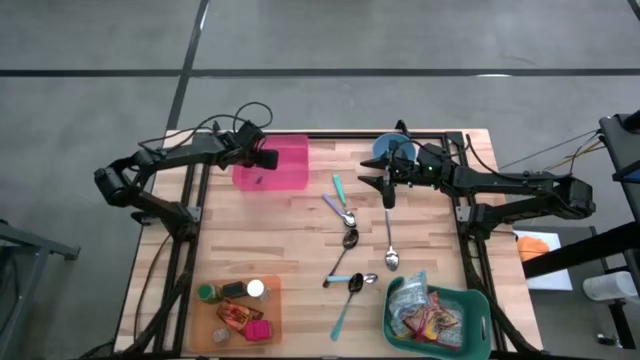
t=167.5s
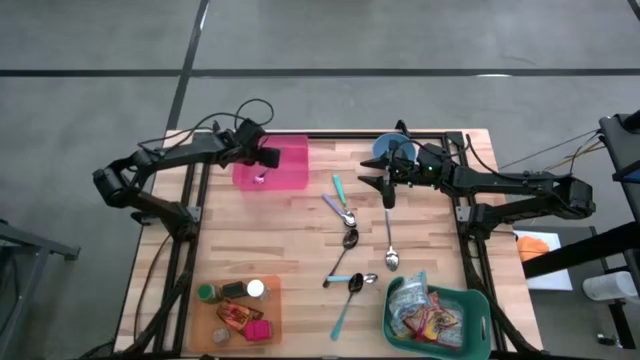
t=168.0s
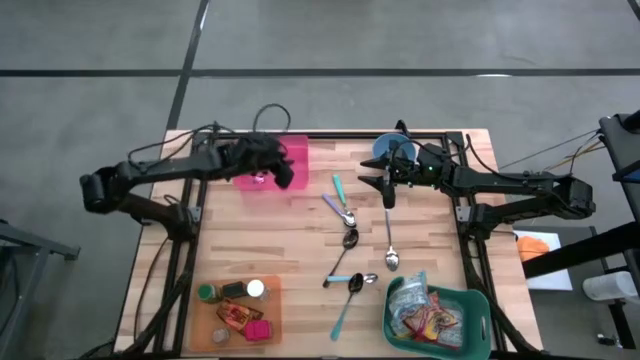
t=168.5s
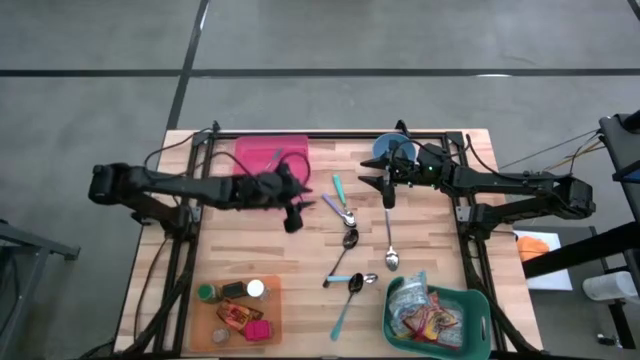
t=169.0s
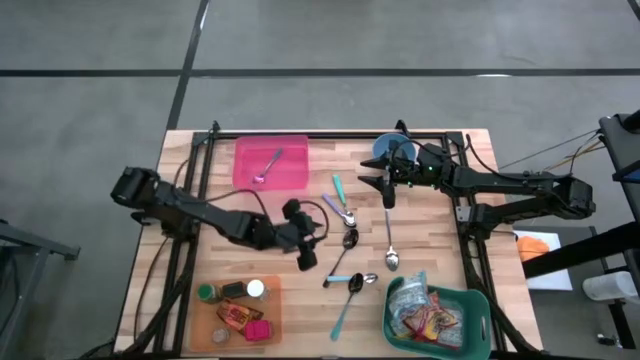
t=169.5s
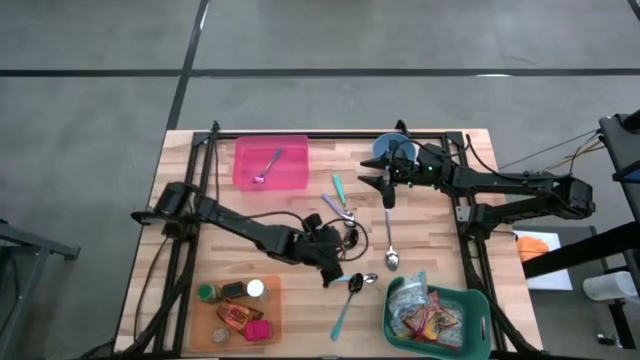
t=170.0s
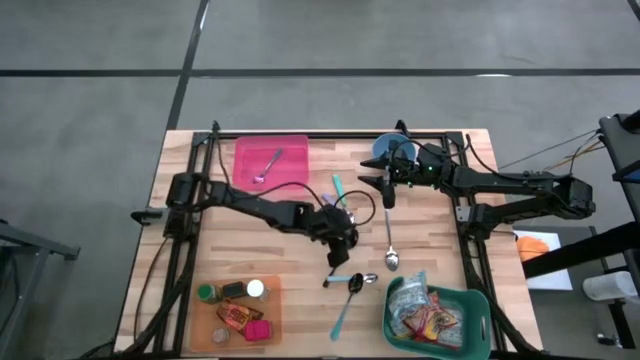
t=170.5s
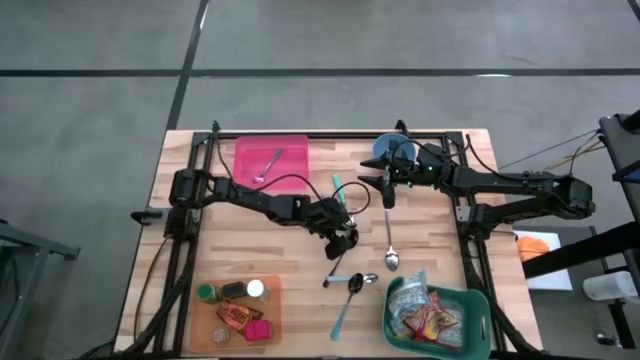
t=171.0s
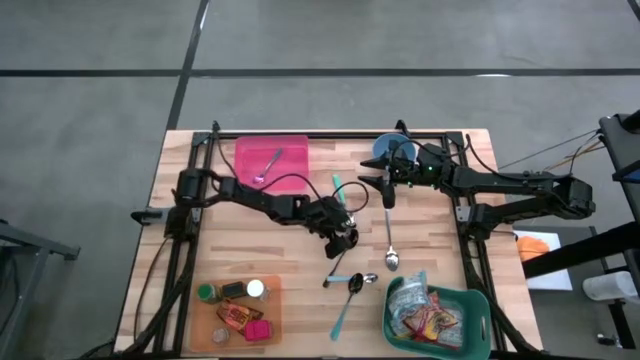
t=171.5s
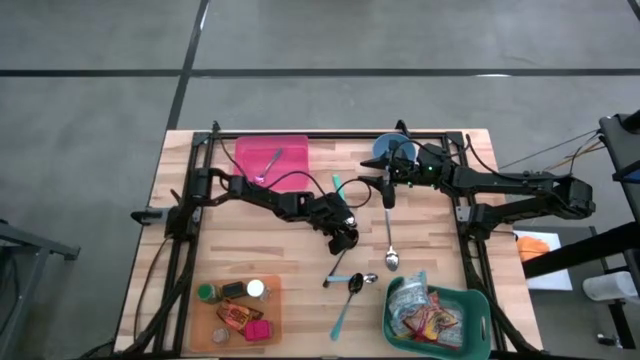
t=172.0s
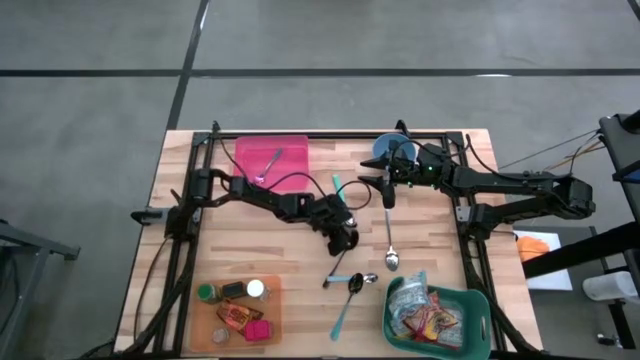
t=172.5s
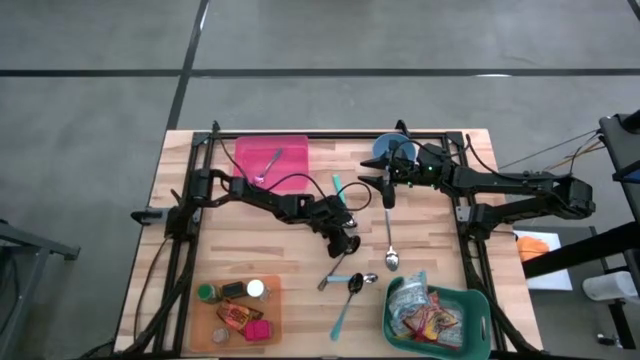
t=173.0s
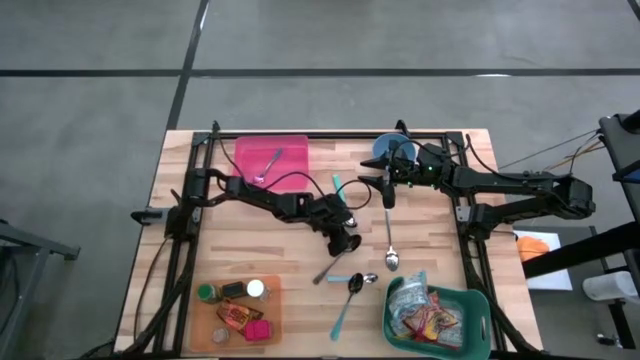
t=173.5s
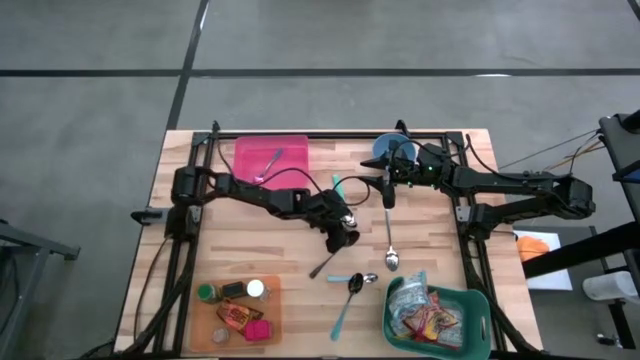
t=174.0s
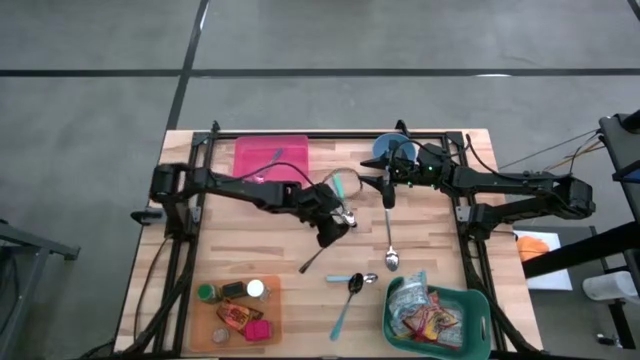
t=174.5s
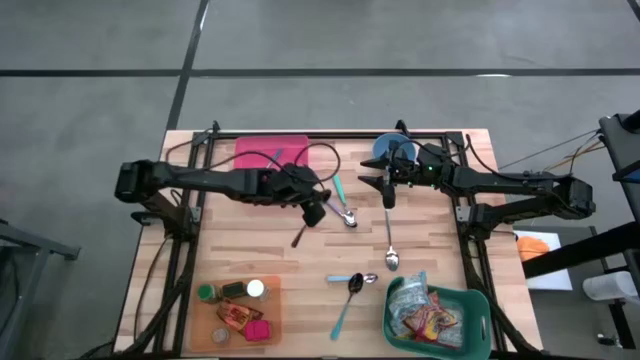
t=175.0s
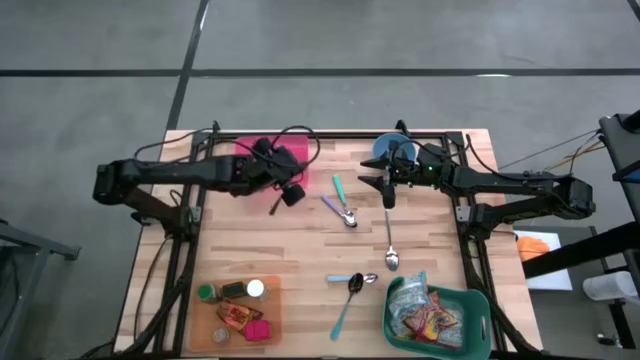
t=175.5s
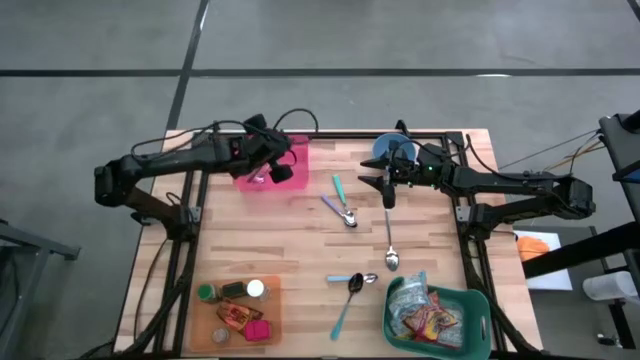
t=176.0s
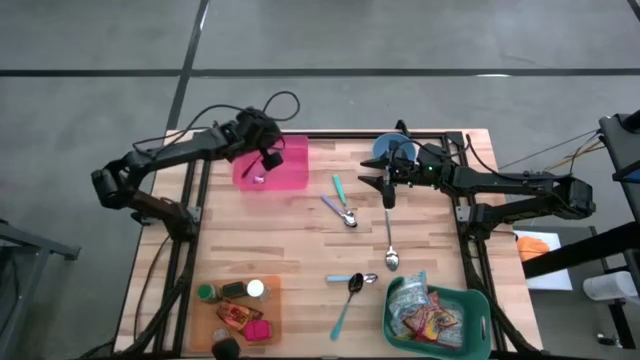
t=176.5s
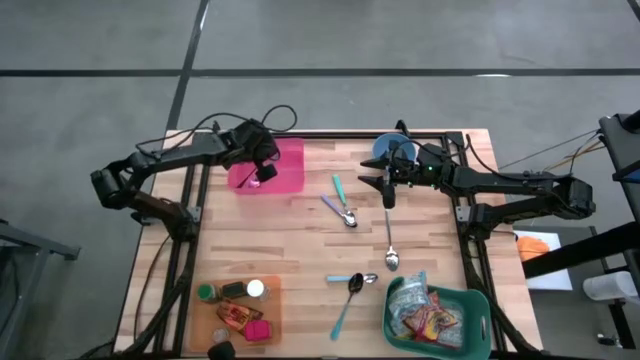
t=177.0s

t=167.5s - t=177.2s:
Put the black spoon into the pink bin

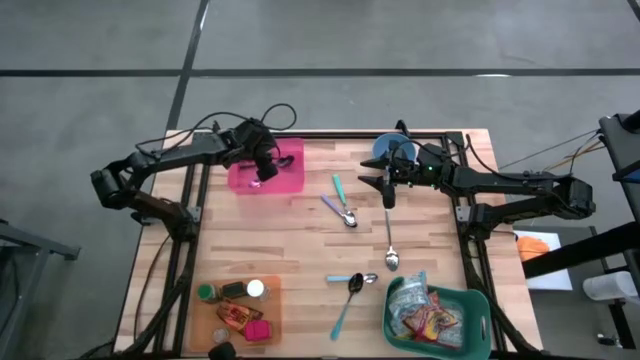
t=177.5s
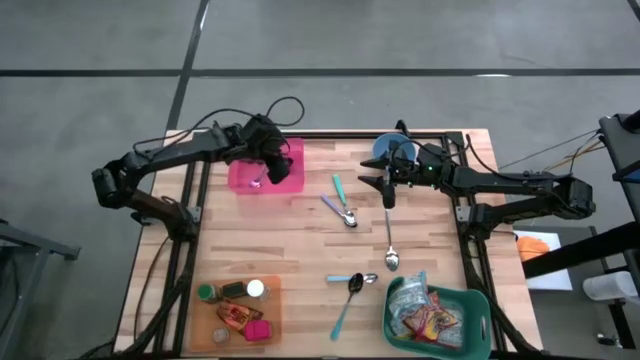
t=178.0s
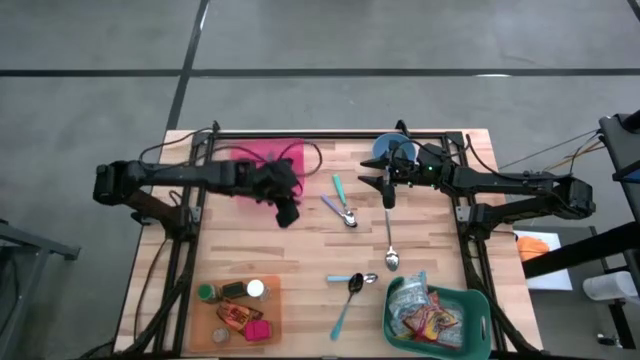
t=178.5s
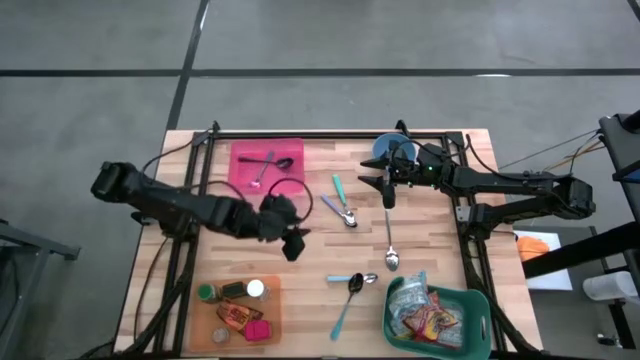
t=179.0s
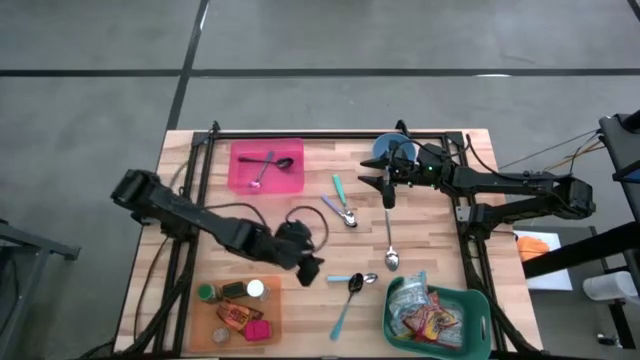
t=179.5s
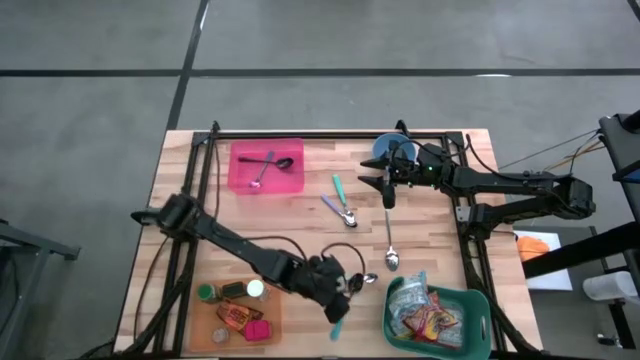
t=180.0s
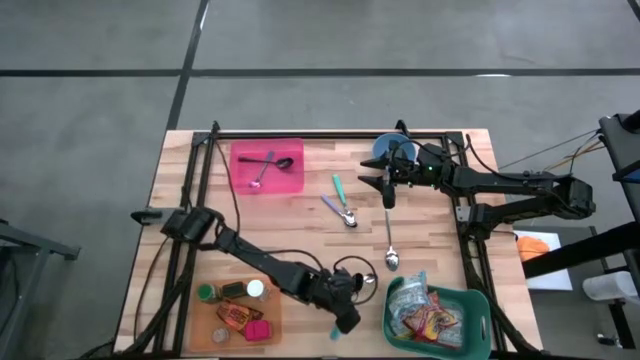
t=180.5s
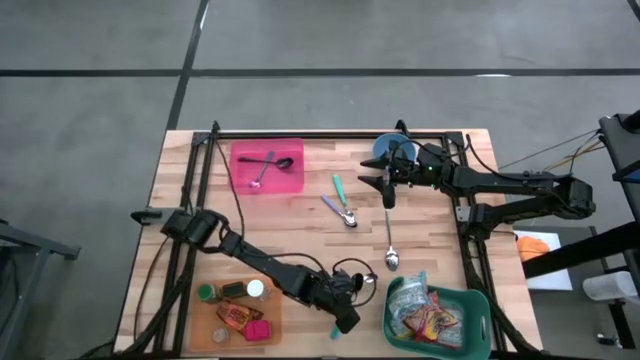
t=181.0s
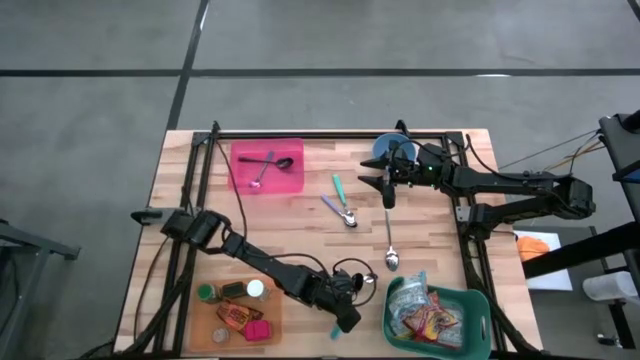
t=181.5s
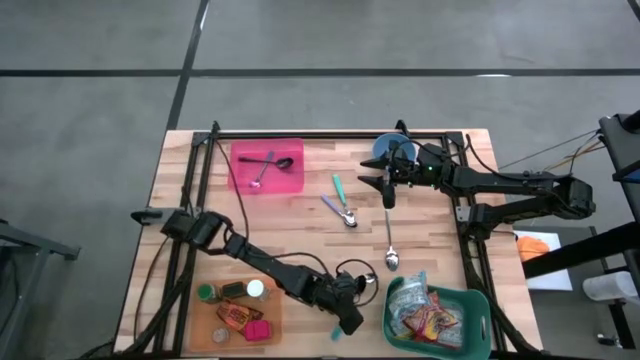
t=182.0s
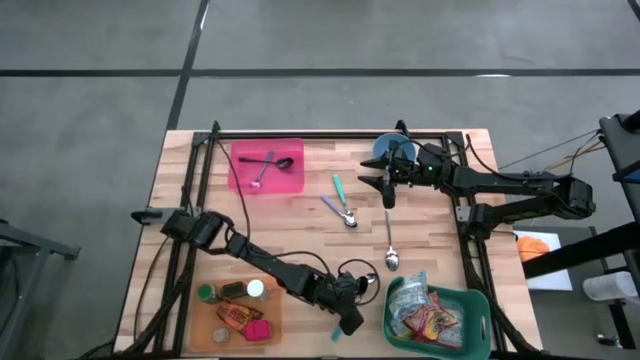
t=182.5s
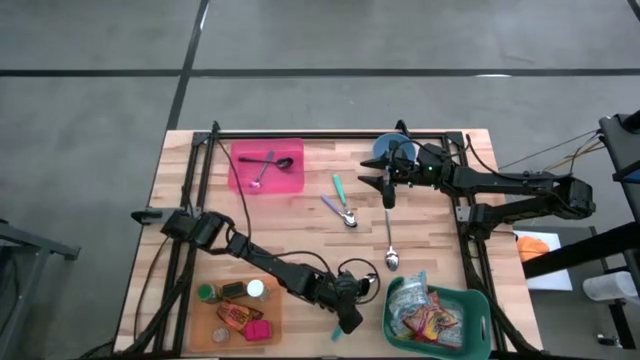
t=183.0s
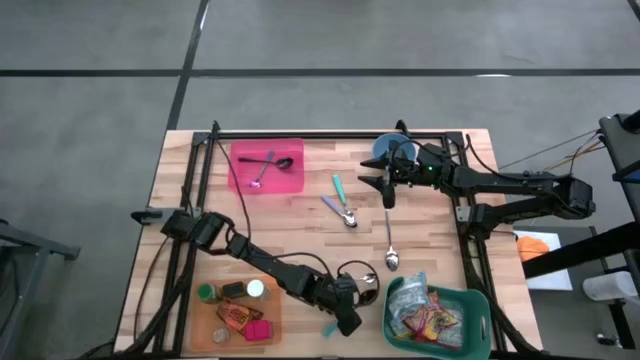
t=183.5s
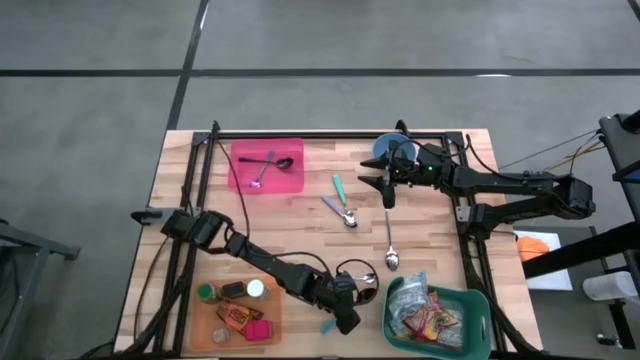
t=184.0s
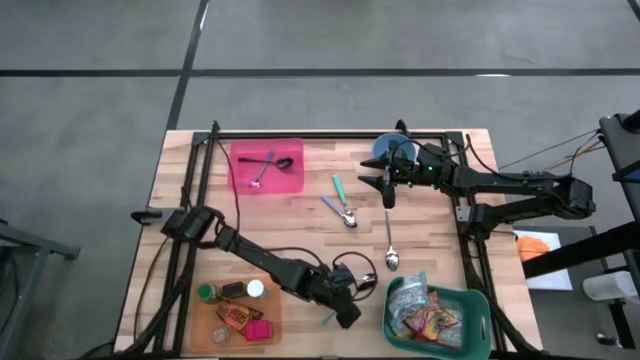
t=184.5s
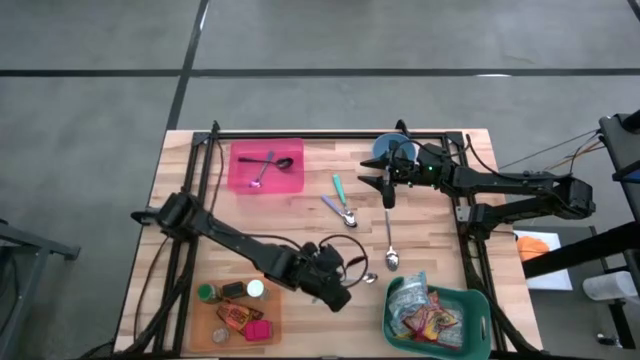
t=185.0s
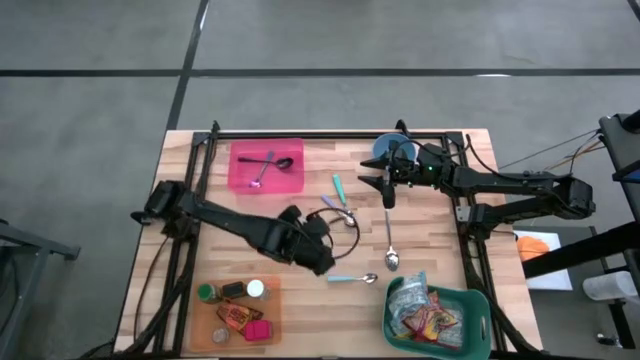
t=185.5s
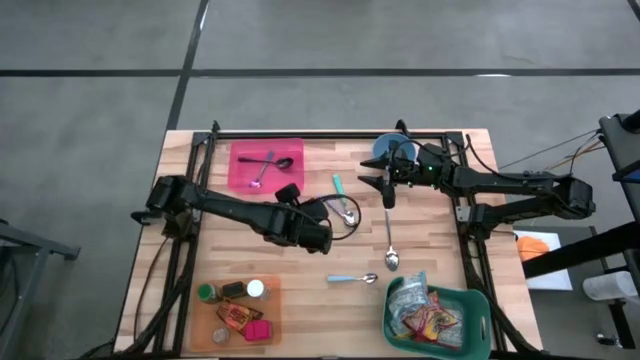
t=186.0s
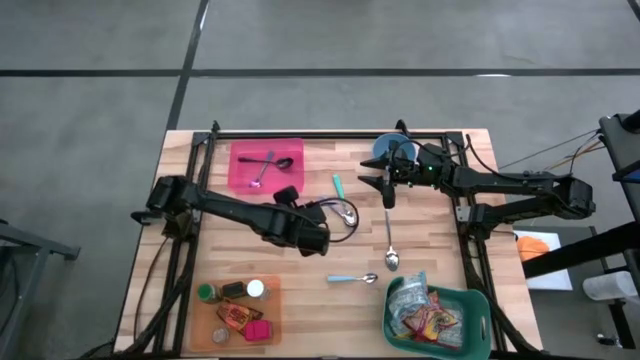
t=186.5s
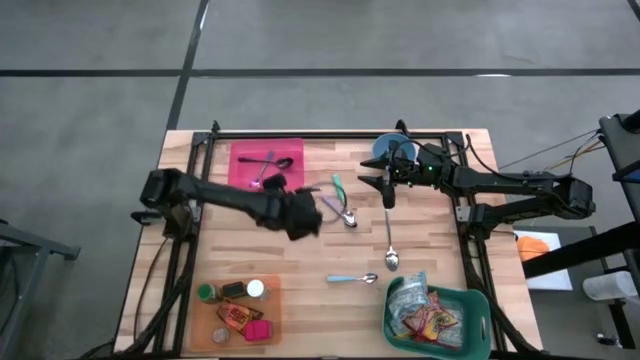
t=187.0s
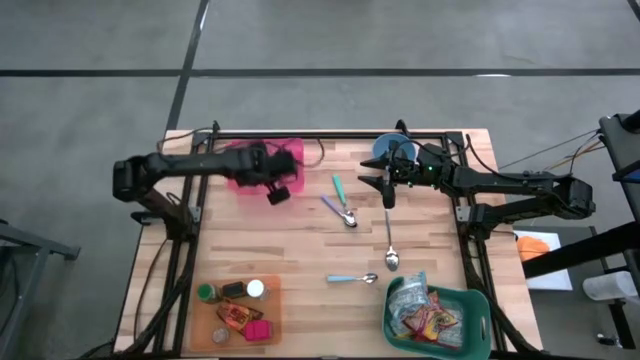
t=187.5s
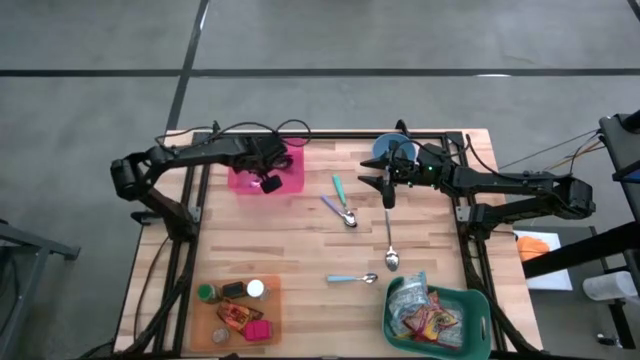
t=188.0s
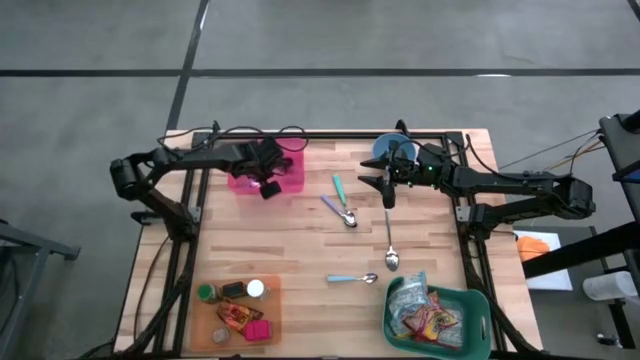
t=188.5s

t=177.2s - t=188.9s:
Put the blue spoon into the pink bin
